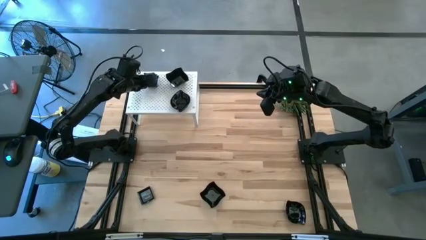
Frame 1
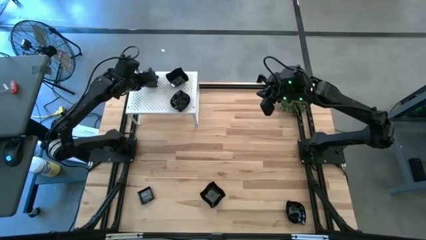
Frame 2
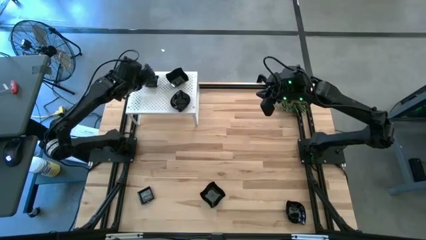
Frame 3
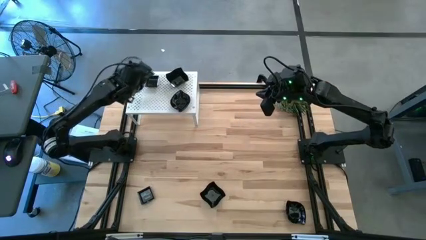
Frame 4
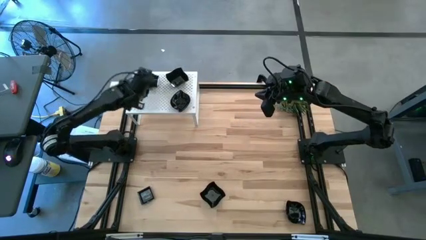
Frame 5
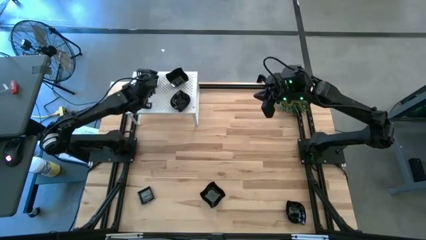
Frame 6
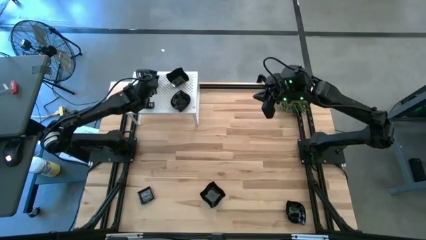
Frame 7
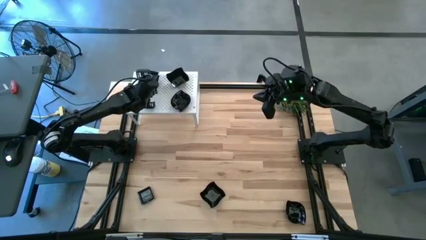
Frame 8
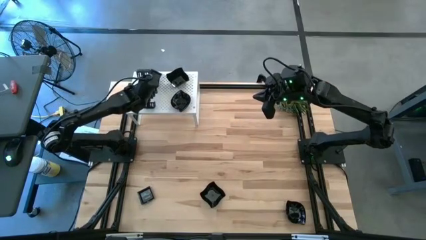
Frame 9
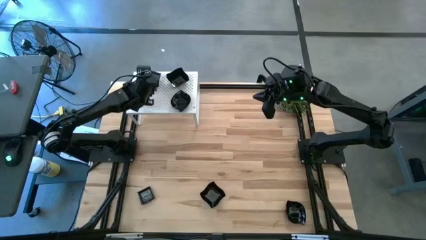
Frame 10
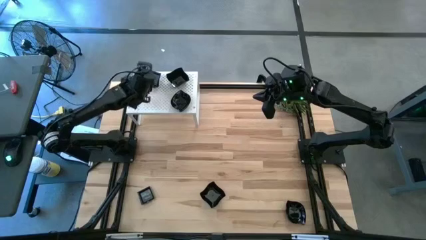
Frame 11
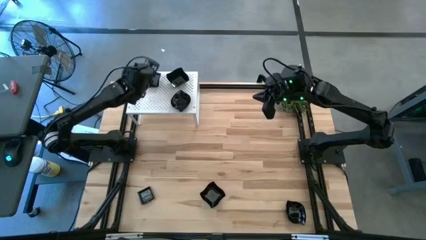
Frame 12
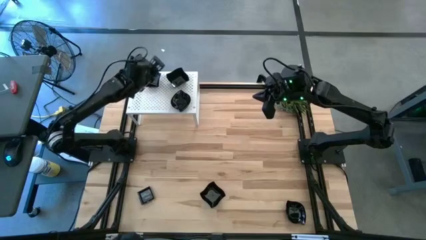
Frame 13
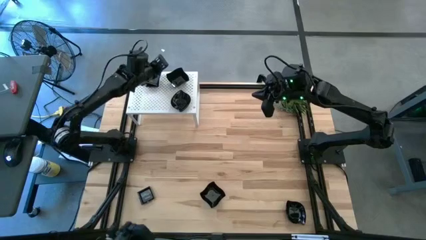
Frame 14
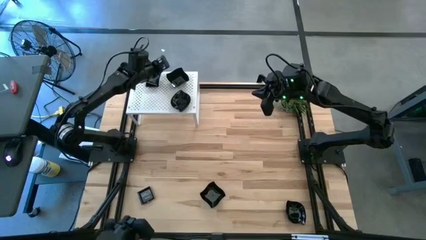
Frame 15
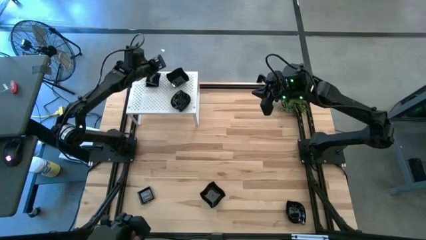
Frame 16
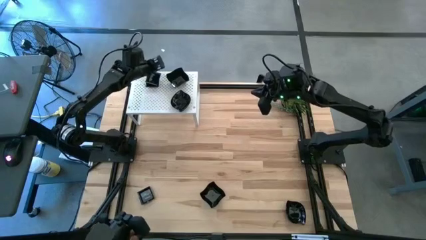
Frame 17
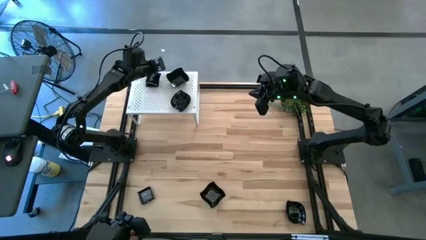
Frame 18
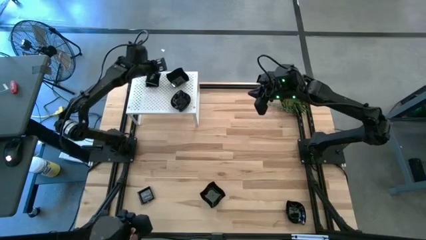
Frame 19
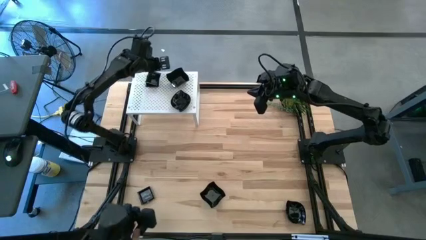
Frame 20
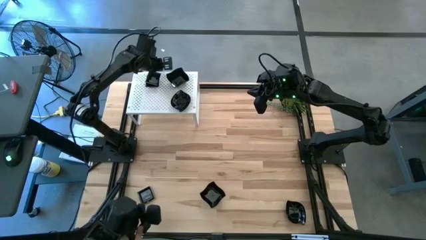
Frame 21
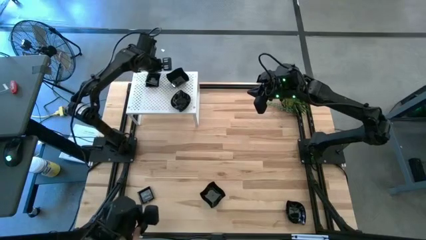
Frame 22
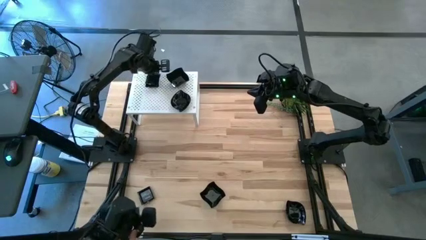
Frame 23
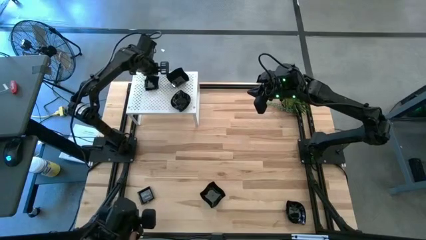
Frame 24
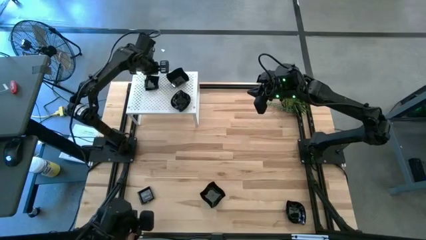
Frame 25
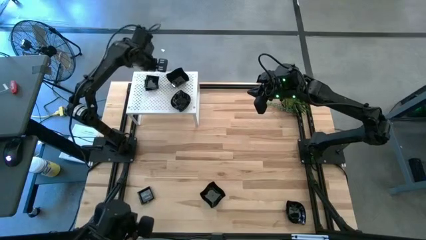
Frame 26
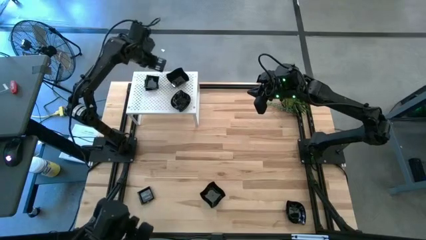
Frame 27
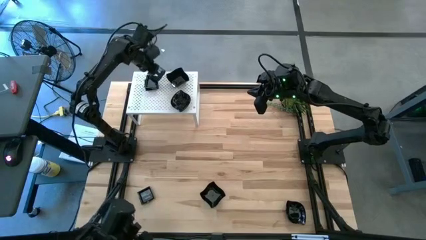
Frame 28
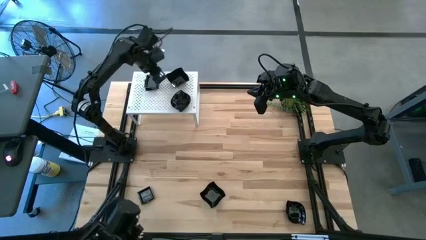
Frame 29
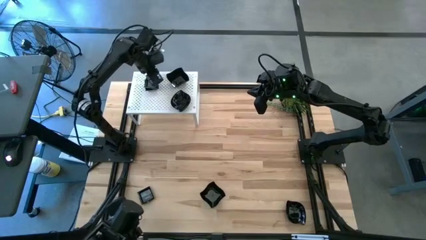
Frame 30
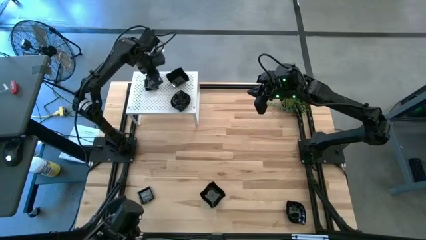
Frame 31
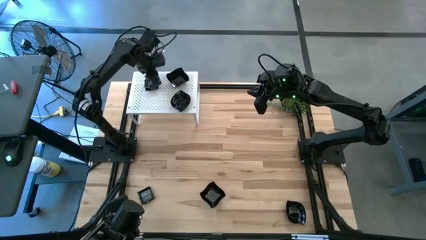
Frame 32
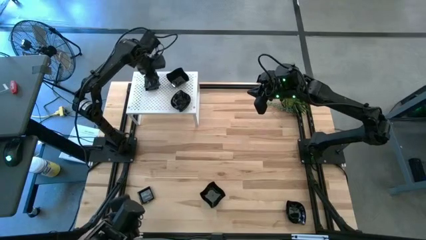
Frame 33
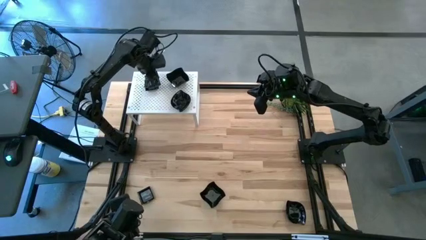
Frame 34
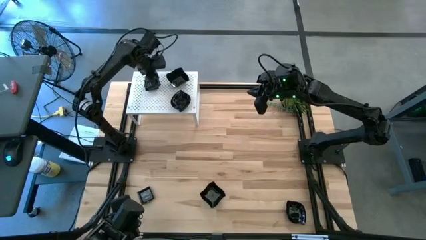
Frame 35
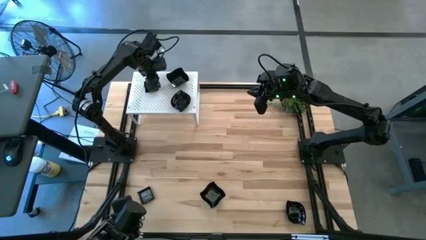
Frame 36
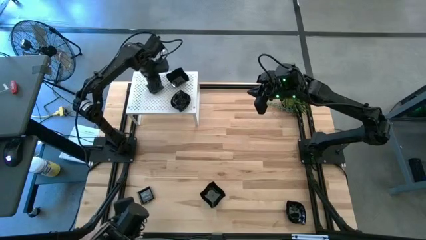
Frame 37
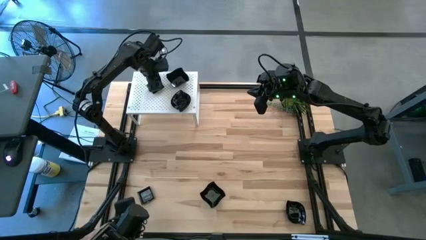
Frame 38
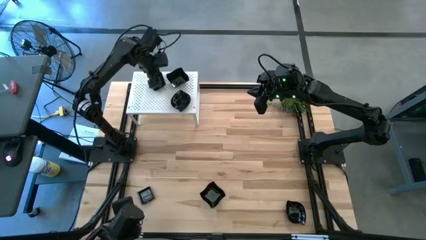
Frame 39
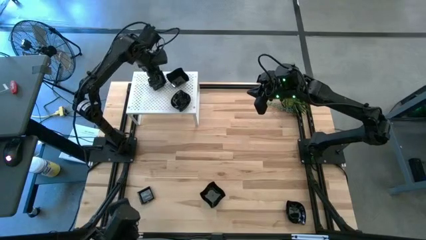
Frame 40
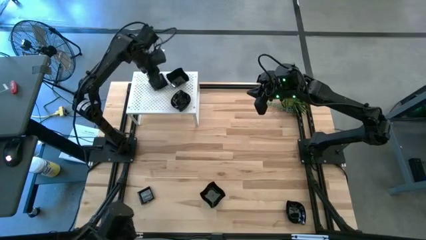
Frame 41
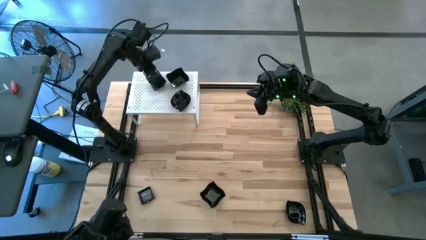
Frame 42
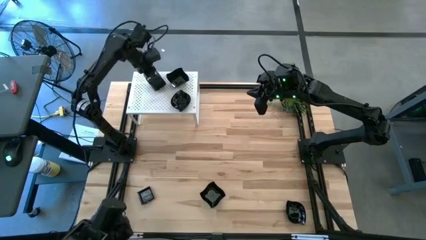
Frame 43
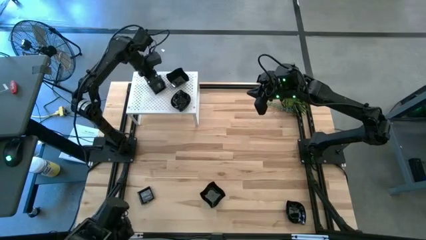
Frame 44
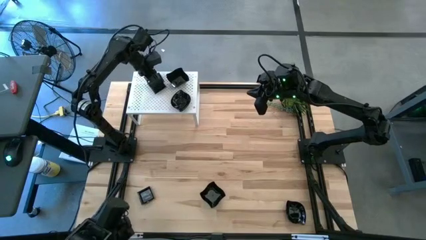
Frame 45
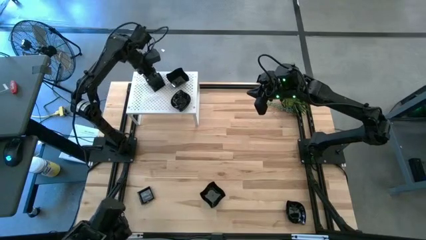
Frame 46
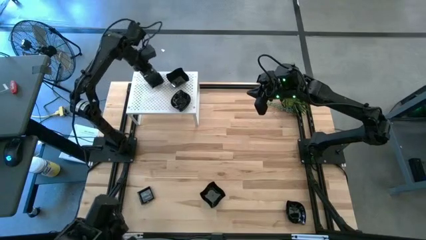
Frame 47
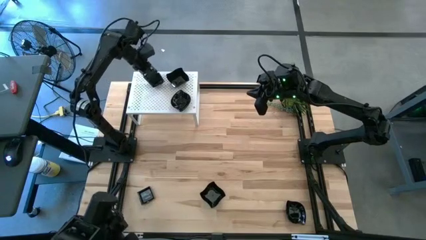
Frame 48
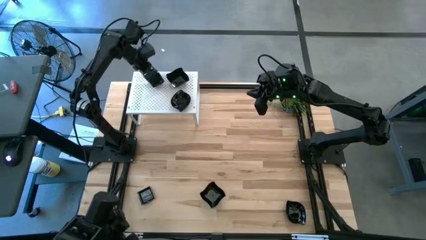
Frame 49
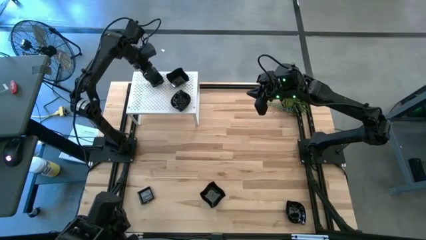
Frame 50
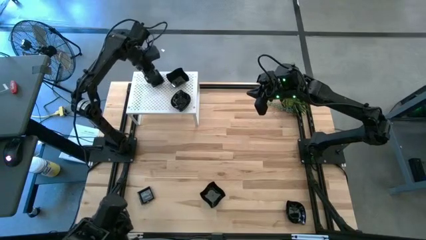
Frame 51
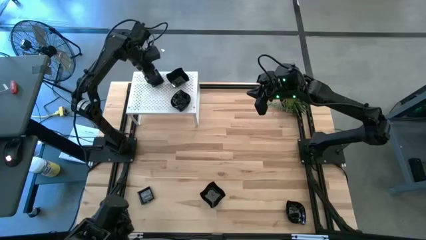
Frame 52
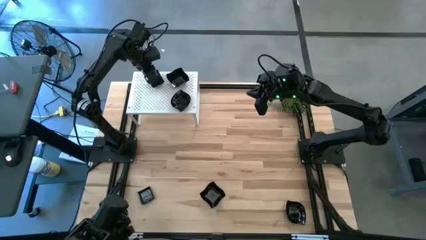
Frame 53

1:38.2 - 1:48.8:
Task: Pick & Place Mini shaped plates
Stack the black square plate on top of the other black square plates on the shelf
